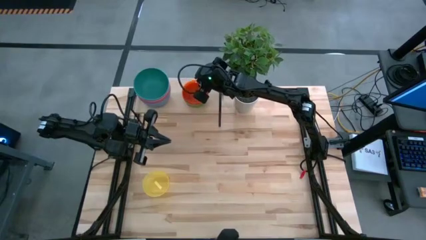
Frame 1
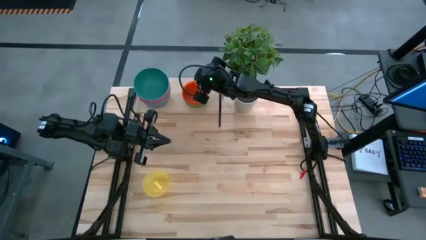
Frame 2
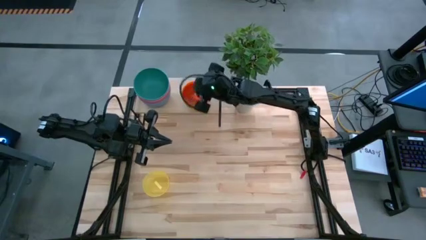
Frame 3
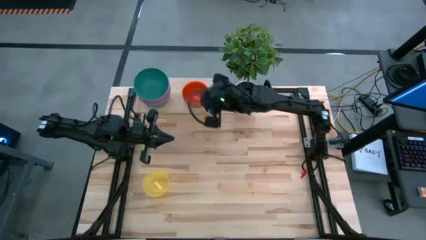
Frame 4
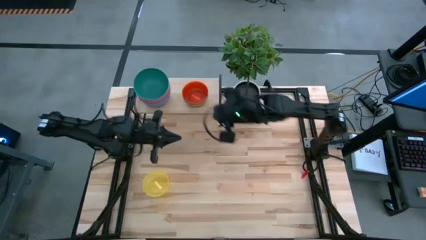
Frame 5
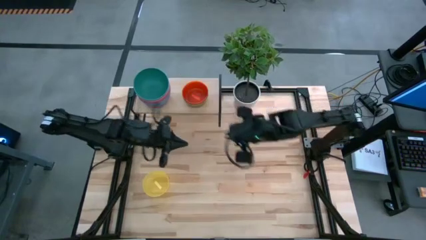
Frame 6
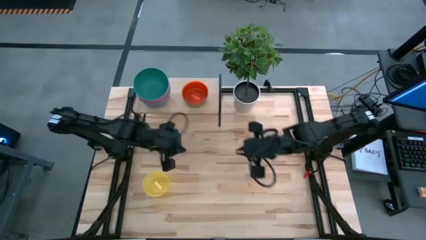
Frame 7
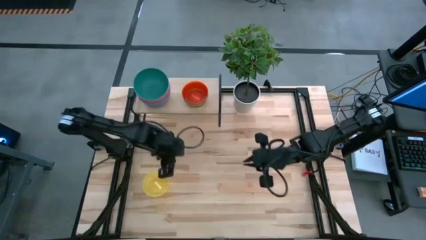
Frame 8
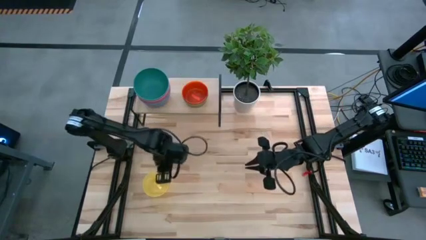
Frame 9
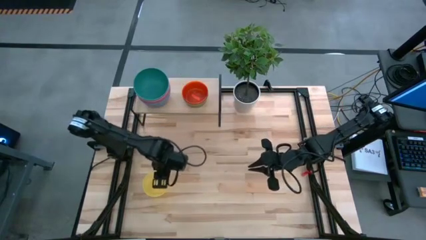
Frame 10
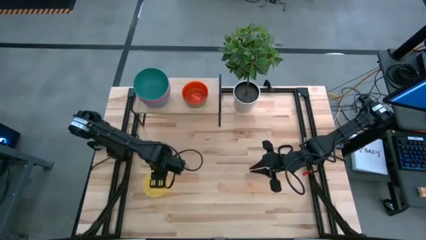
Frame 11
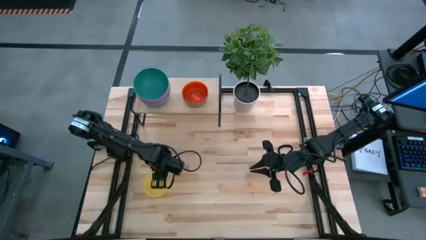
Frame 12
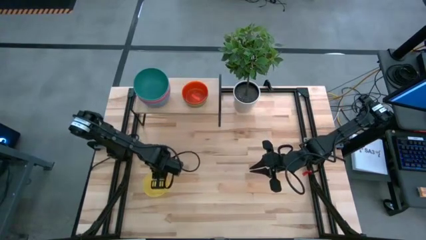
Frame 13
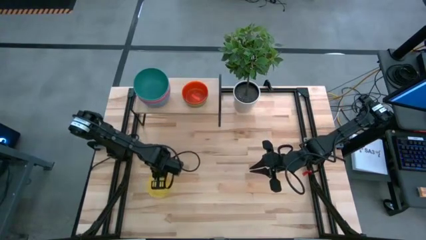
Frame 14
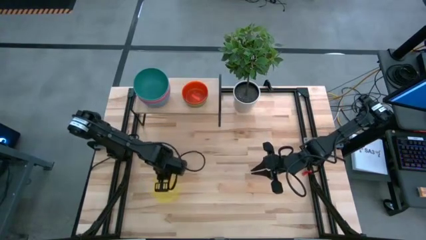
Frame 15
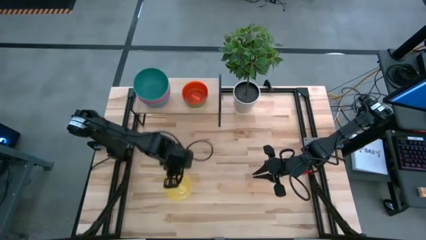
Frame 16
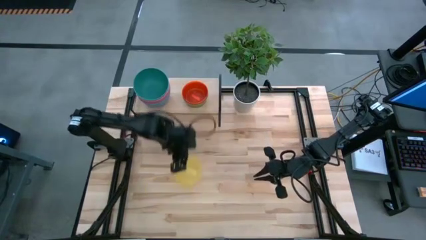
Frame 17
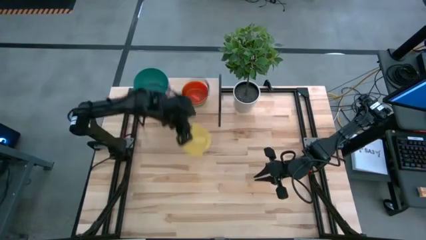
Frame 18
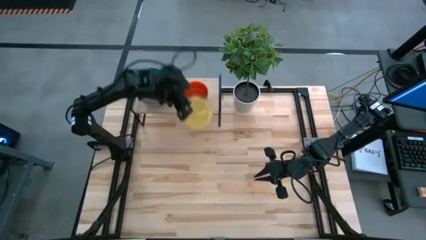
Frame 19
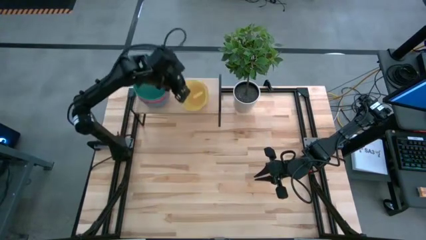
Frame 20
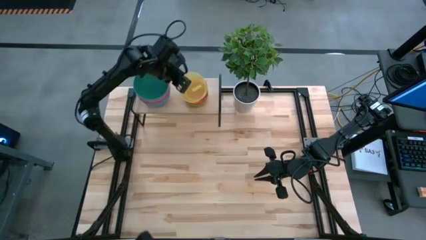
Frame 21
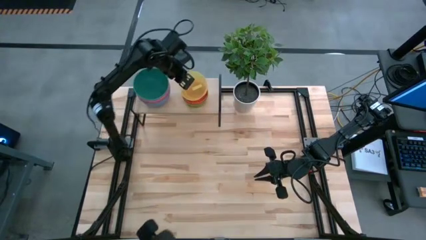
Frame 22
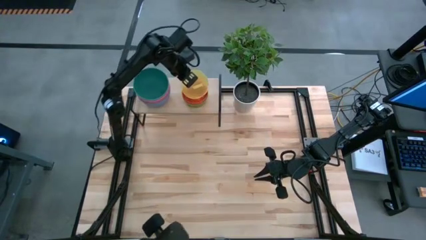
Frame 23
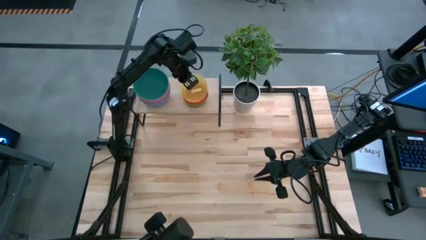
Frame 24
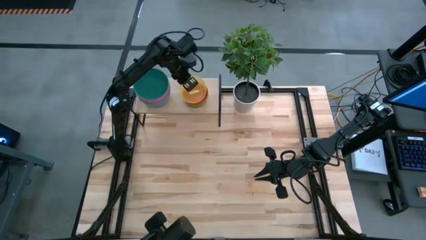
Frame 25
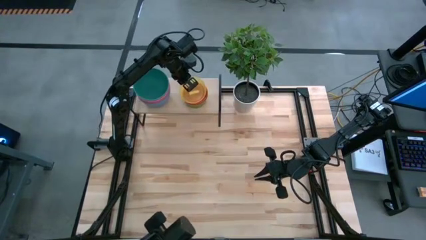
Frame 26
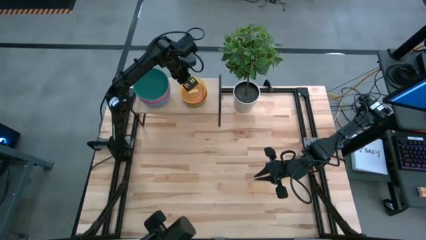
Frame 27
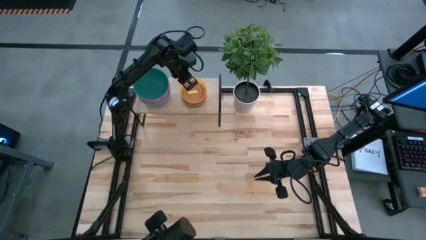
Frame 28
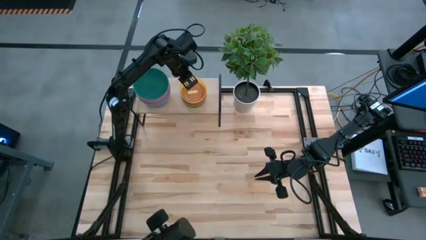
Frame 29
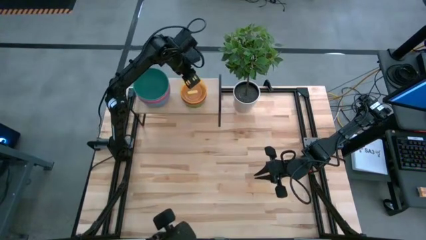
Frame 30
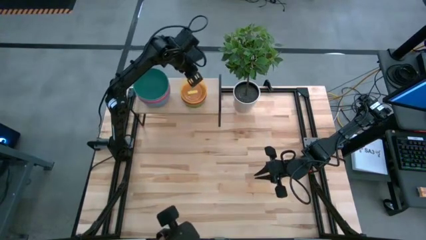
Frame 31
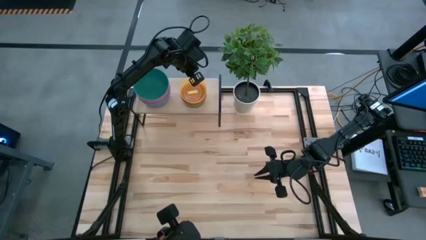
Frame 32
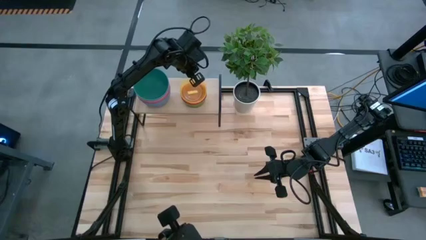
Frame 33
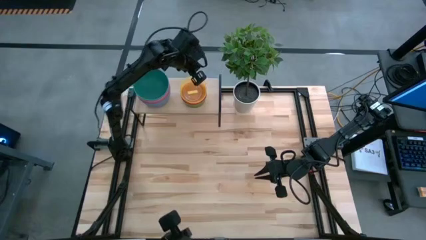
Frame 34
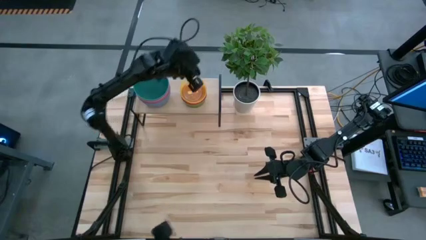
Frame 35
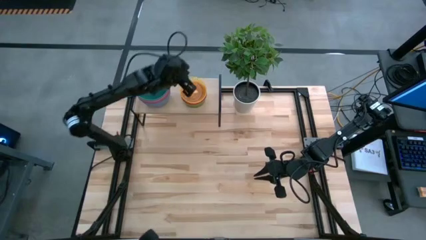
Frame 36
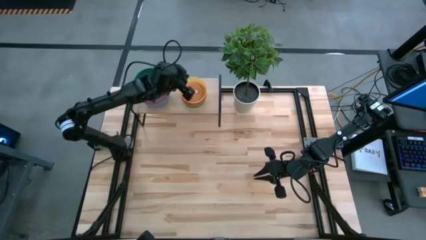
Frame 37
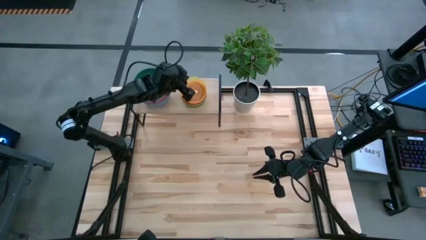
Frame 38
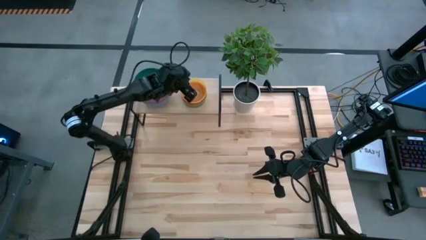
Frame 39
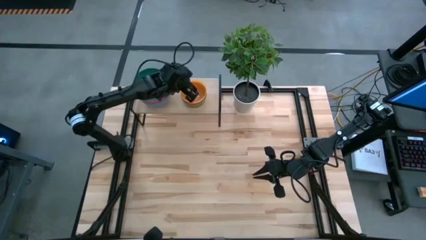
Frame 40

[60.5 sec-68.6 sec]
Task: Place and stack bowls onto a shelf
Stack the transparent yellow bowl on top of the transparent orange bowl on the shelf

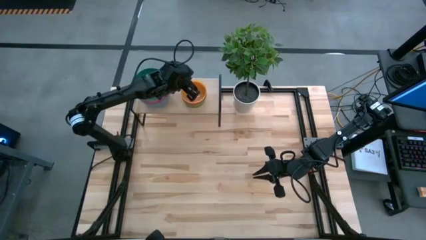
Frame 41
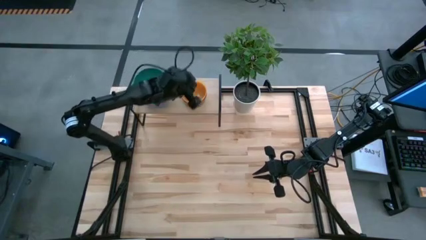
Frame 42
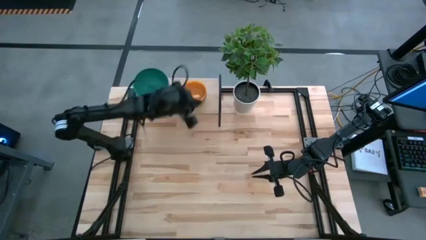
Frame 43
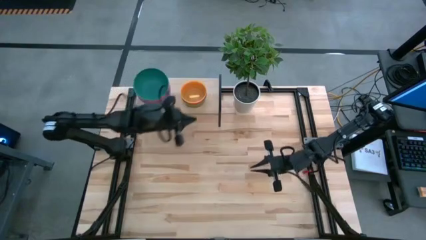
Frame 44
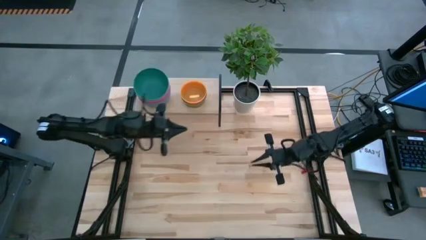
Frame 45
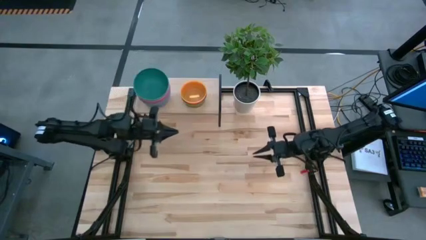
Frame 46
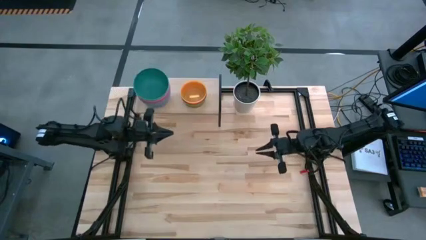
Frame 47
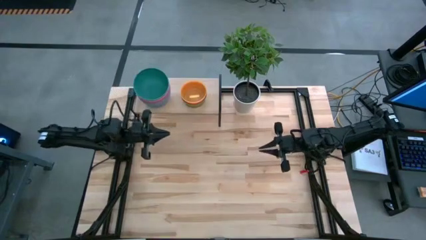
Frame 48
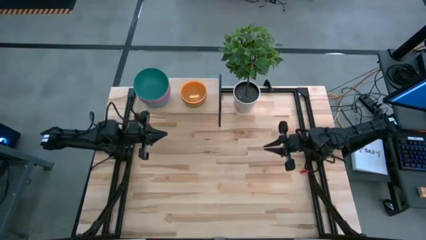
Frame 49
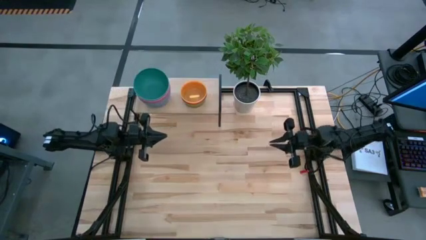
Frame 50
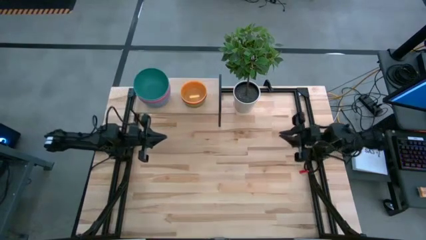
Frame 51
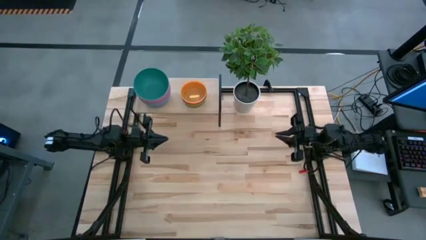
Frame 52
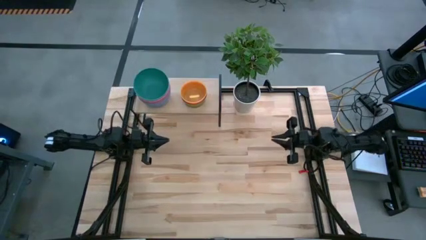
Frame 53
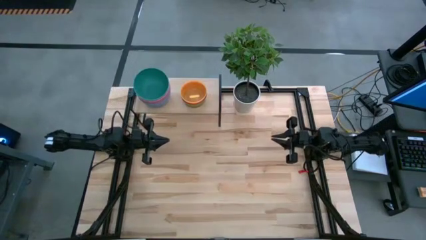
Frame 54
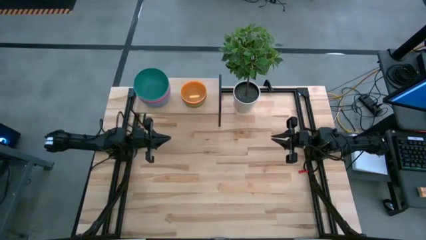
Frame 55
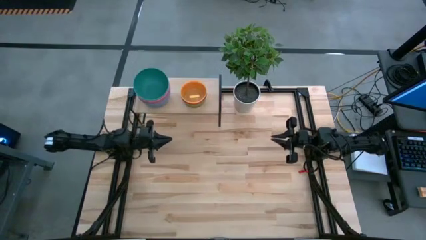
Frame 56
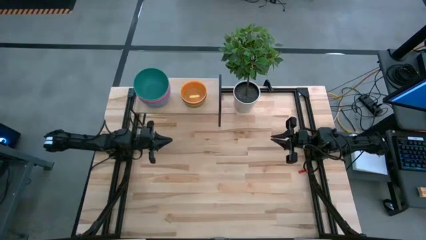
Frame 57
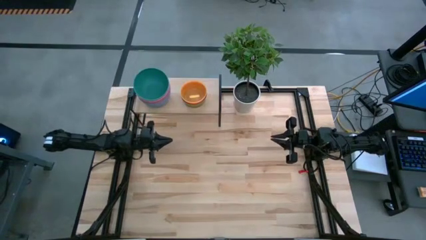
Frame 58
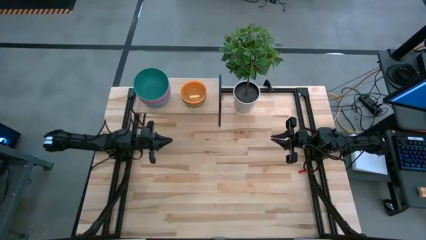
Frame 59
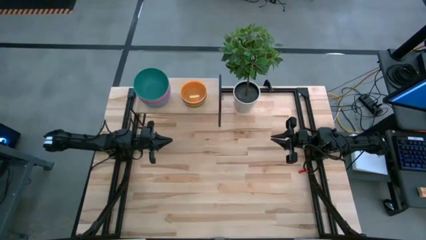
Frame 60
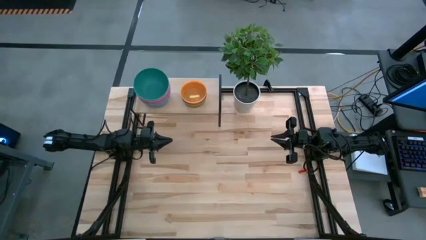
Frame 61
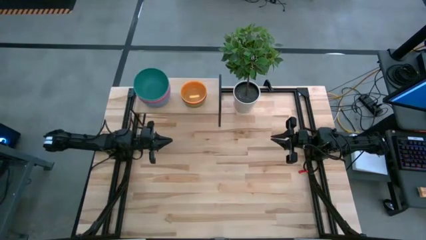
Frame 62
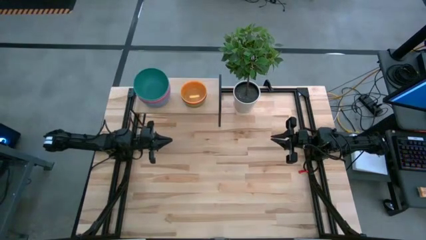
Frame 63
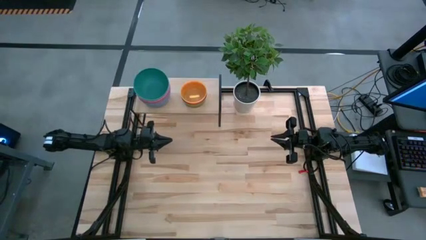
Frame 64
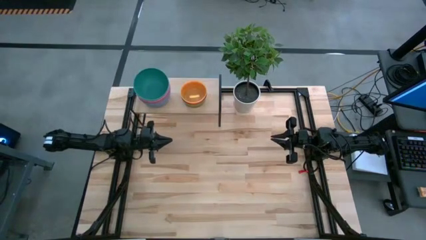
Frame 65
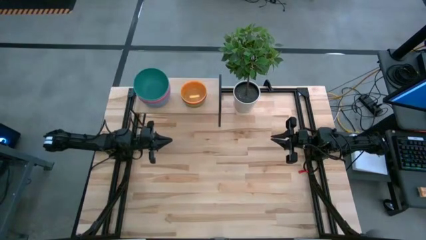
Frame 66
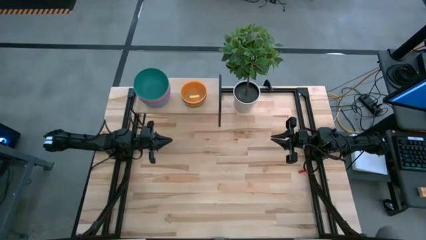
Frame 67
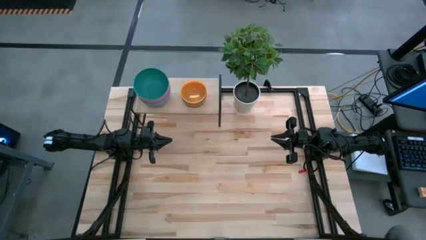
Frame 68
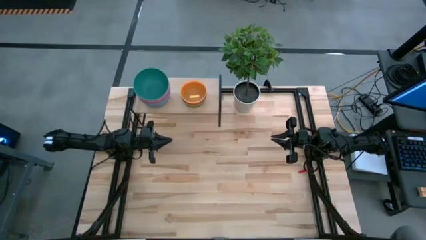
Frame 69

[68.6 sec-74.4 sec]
Return to Home Position
